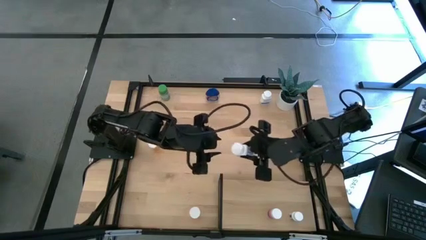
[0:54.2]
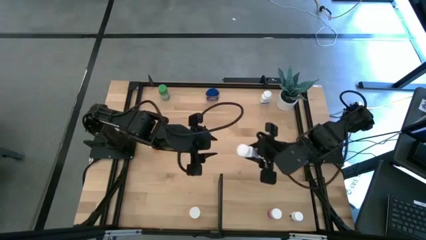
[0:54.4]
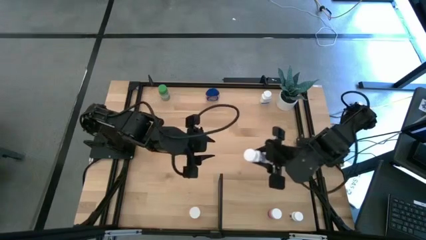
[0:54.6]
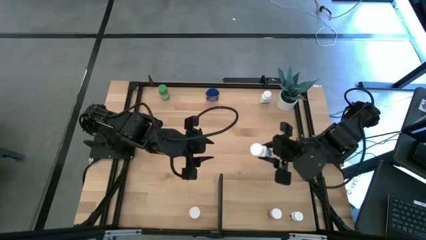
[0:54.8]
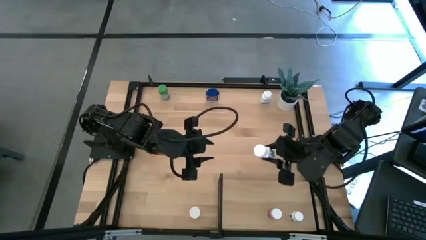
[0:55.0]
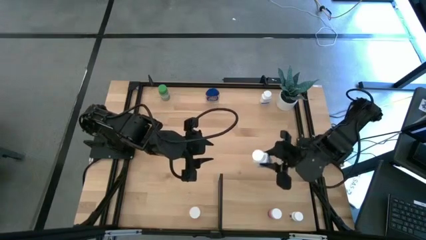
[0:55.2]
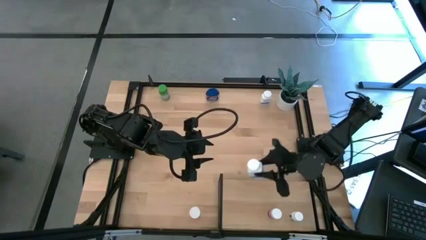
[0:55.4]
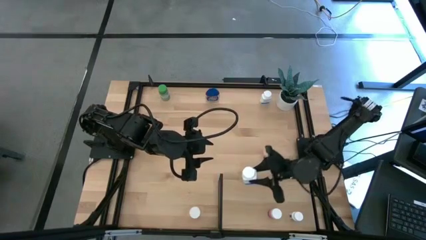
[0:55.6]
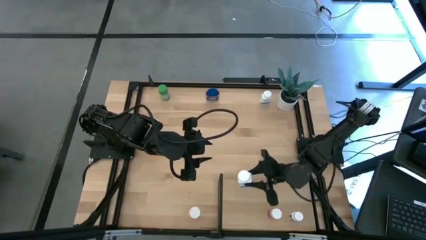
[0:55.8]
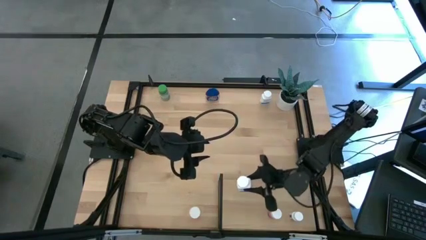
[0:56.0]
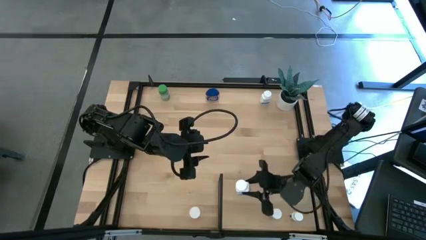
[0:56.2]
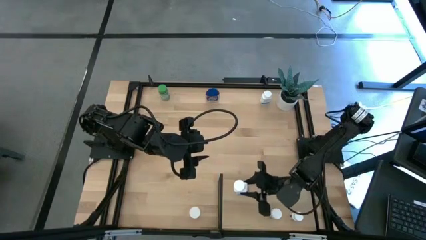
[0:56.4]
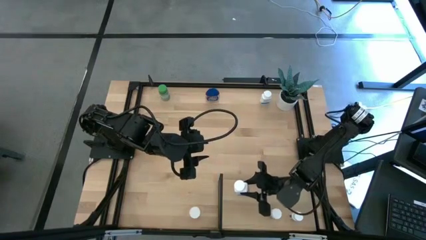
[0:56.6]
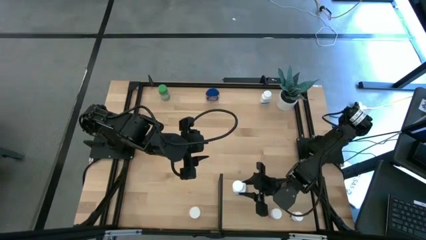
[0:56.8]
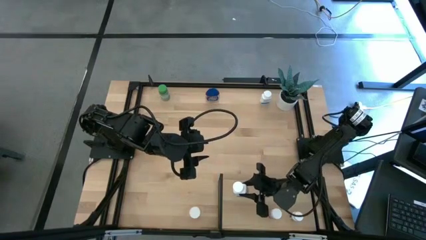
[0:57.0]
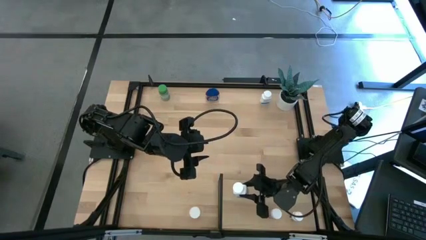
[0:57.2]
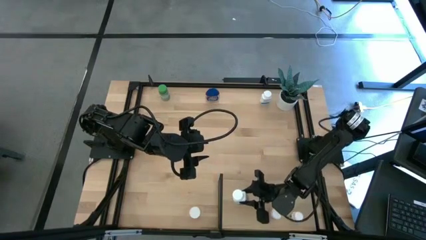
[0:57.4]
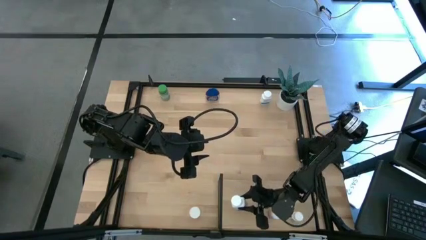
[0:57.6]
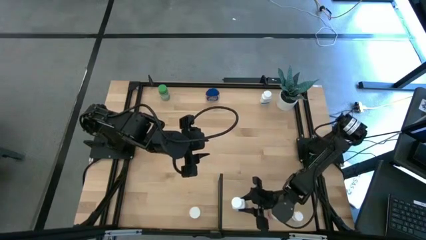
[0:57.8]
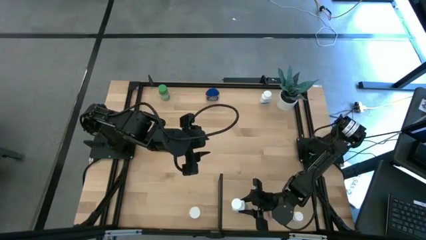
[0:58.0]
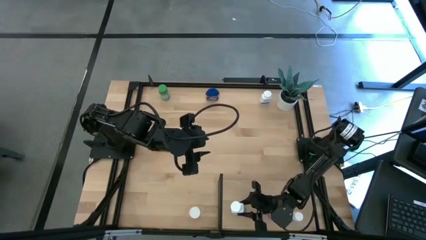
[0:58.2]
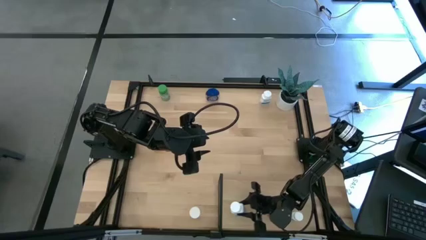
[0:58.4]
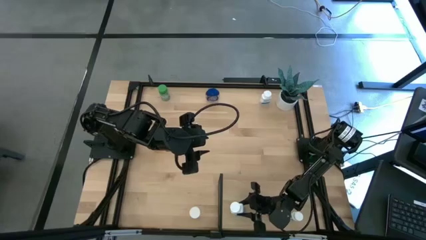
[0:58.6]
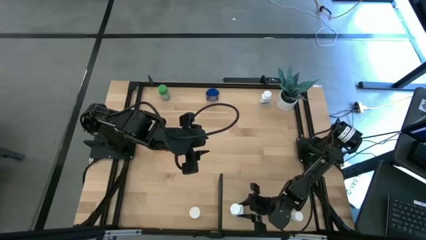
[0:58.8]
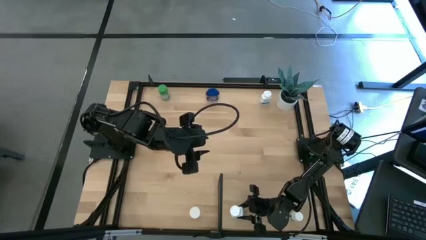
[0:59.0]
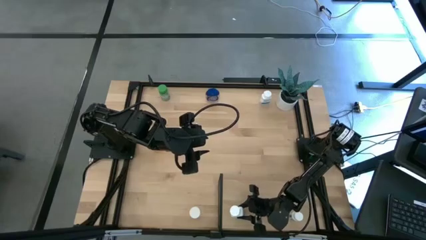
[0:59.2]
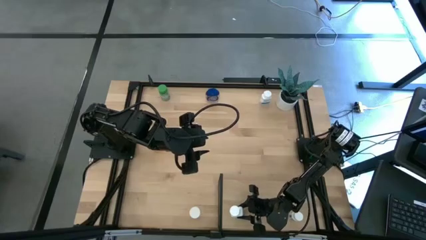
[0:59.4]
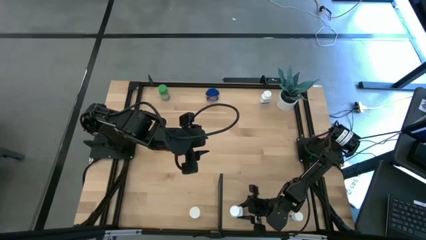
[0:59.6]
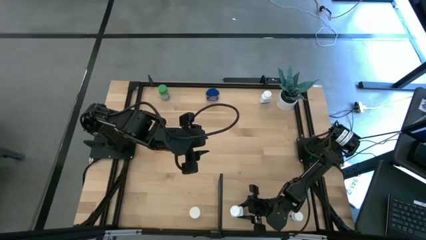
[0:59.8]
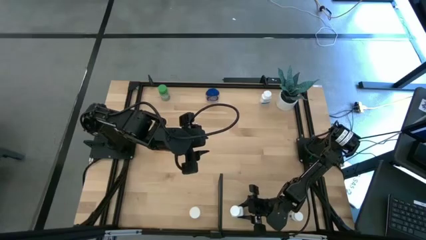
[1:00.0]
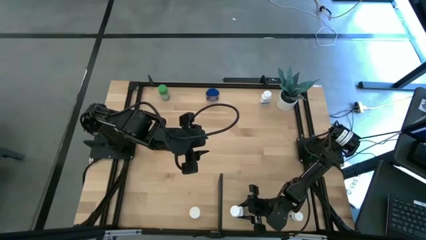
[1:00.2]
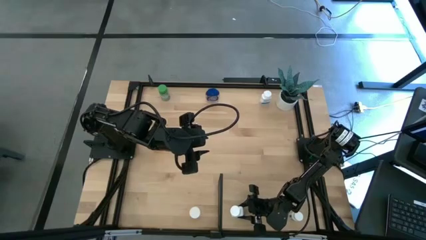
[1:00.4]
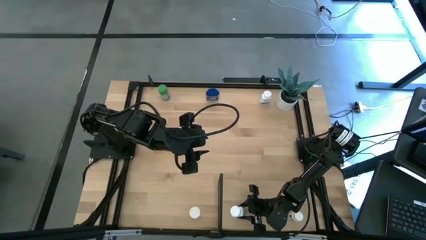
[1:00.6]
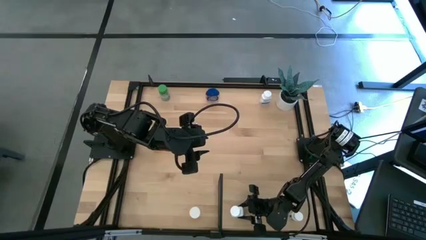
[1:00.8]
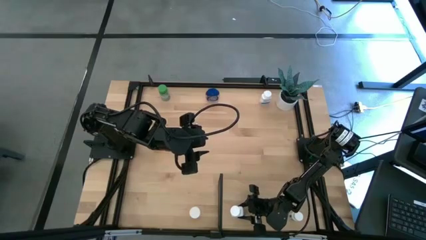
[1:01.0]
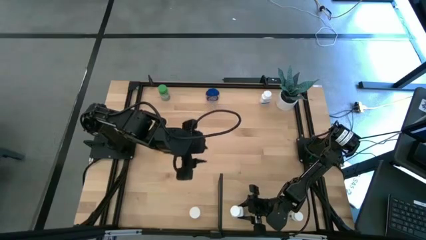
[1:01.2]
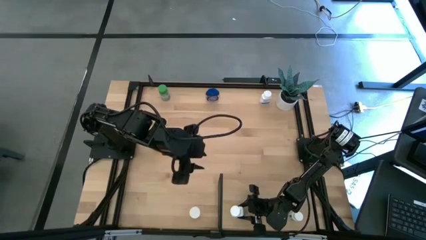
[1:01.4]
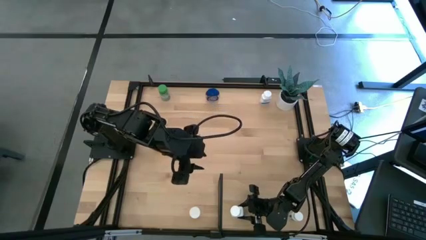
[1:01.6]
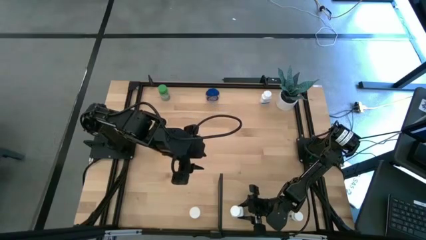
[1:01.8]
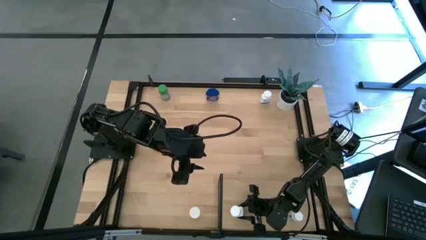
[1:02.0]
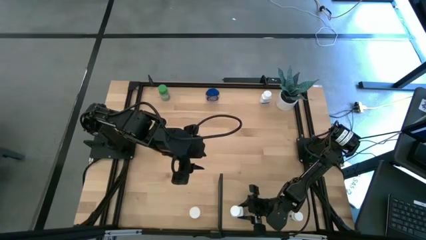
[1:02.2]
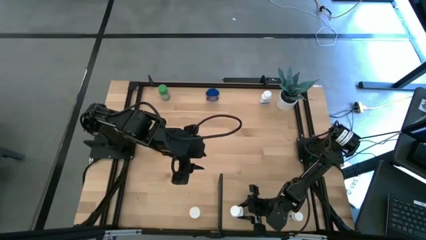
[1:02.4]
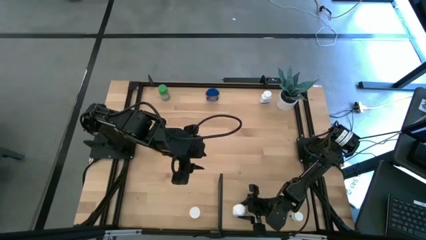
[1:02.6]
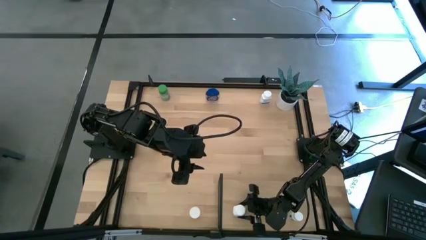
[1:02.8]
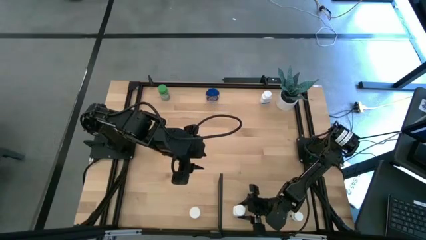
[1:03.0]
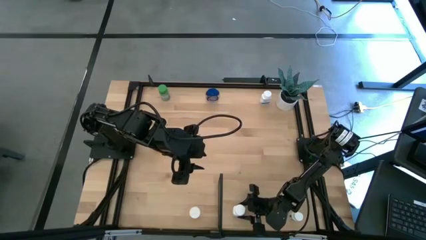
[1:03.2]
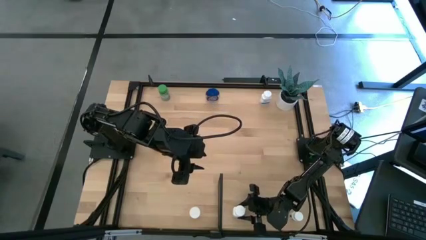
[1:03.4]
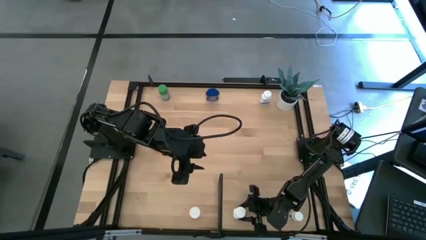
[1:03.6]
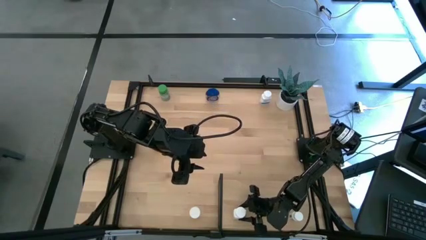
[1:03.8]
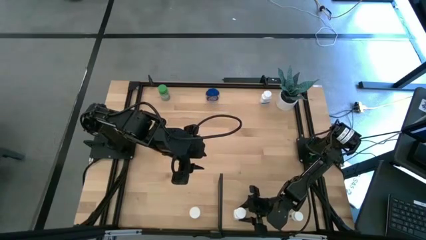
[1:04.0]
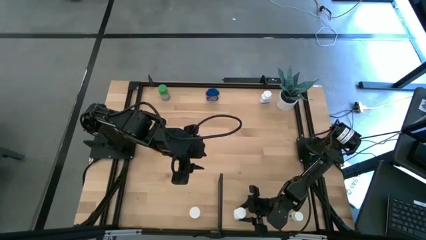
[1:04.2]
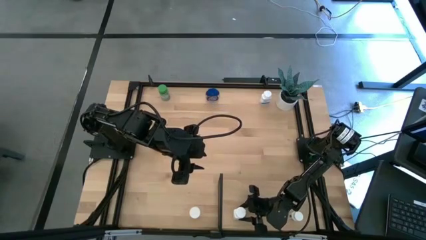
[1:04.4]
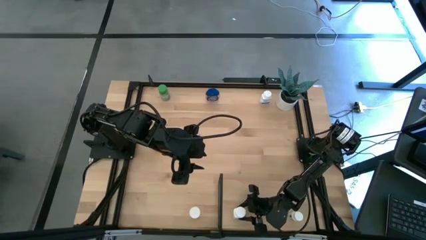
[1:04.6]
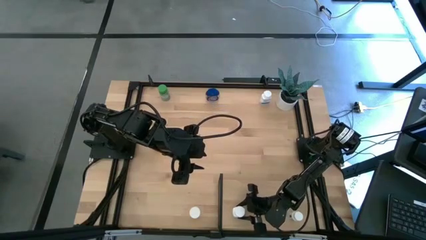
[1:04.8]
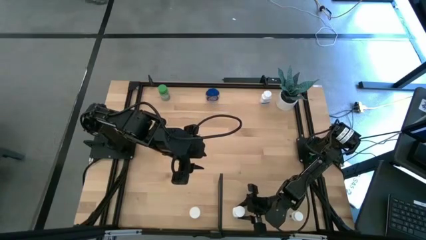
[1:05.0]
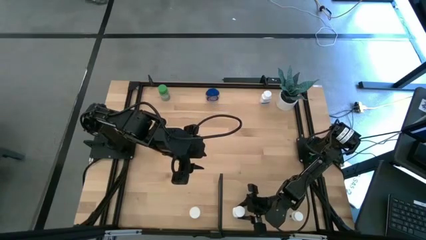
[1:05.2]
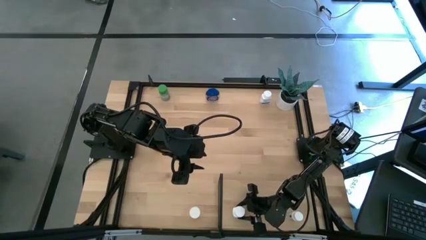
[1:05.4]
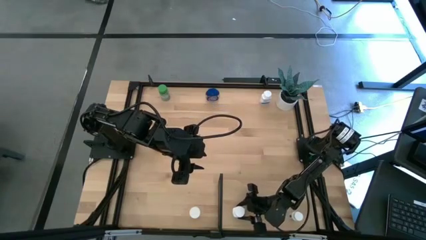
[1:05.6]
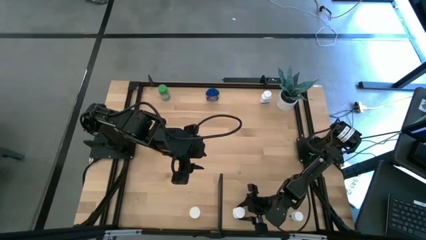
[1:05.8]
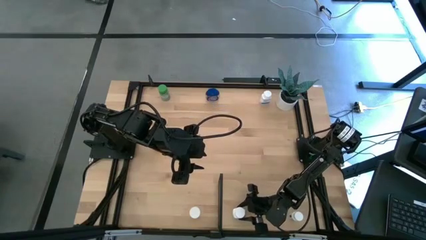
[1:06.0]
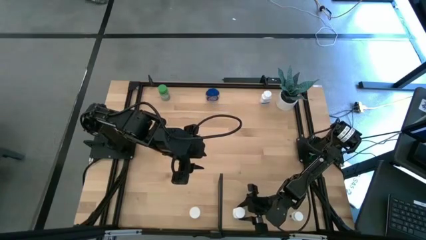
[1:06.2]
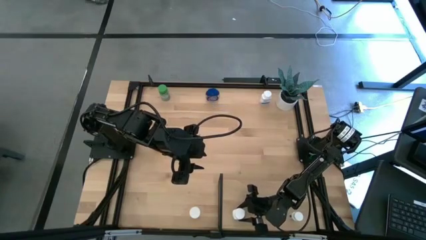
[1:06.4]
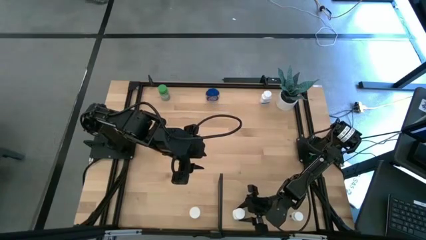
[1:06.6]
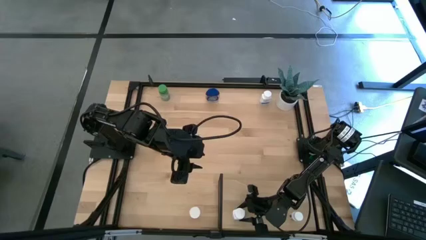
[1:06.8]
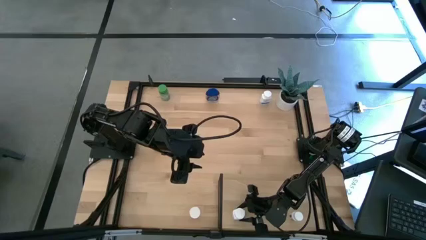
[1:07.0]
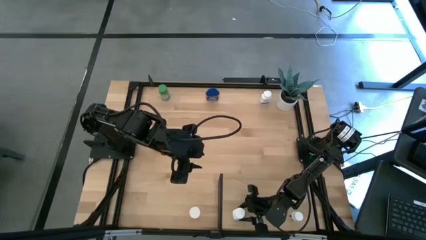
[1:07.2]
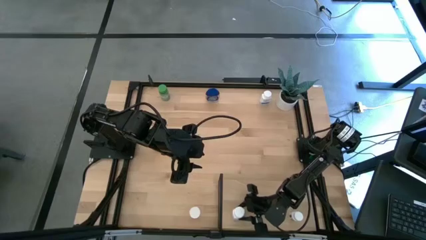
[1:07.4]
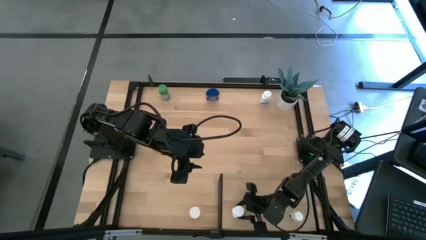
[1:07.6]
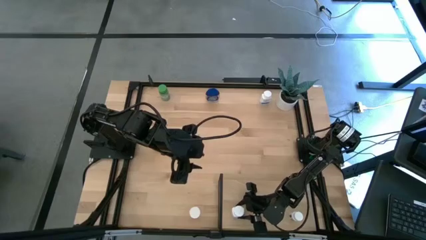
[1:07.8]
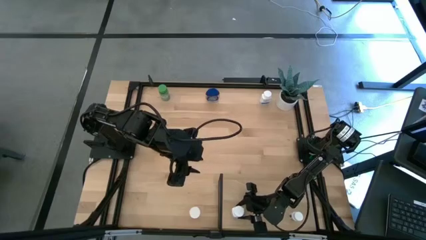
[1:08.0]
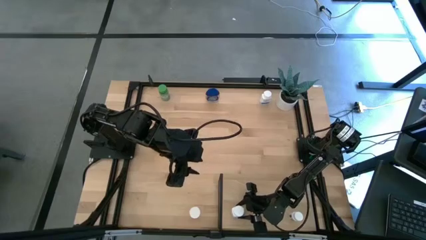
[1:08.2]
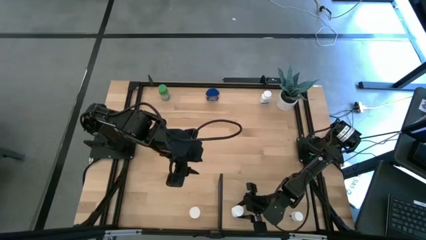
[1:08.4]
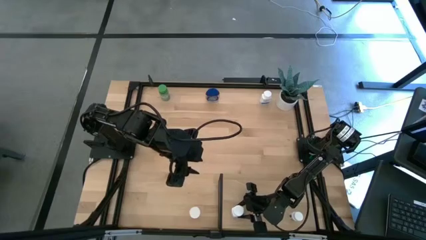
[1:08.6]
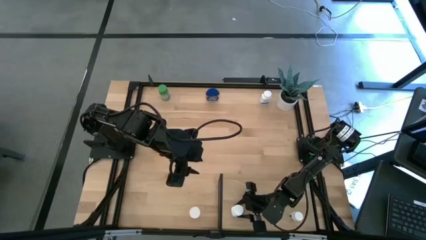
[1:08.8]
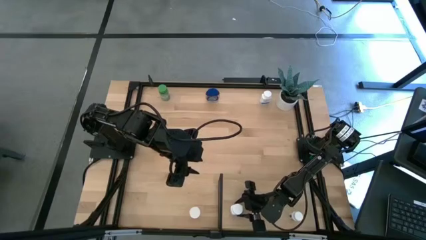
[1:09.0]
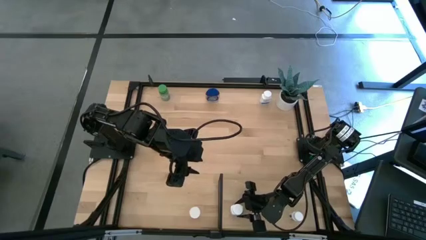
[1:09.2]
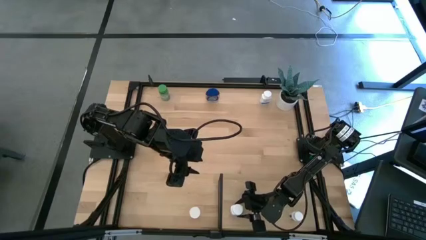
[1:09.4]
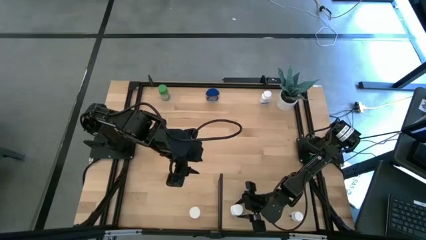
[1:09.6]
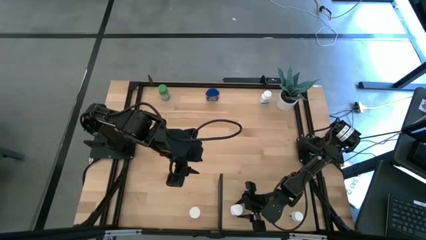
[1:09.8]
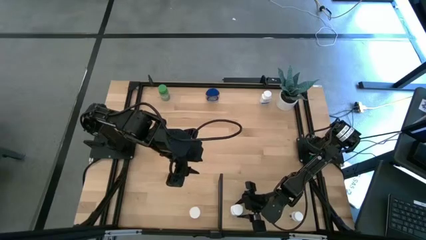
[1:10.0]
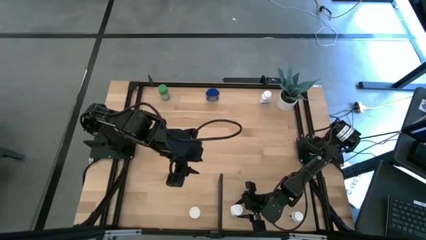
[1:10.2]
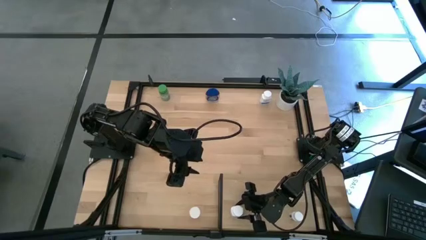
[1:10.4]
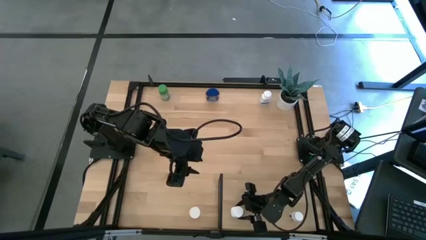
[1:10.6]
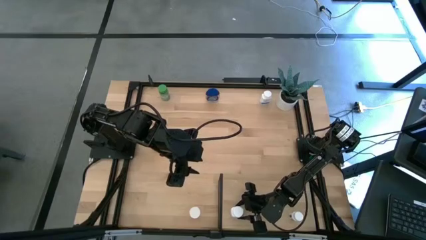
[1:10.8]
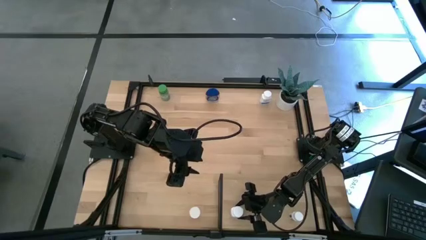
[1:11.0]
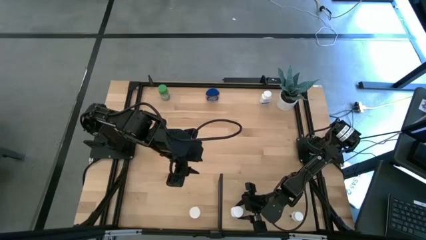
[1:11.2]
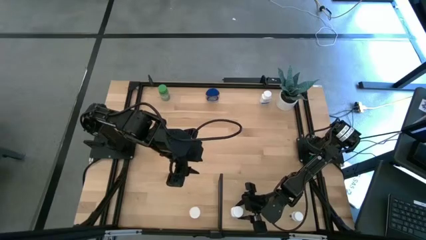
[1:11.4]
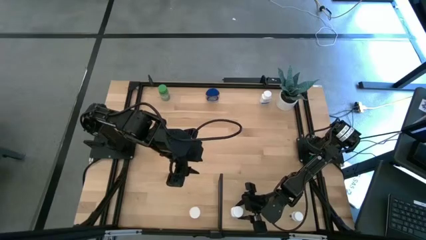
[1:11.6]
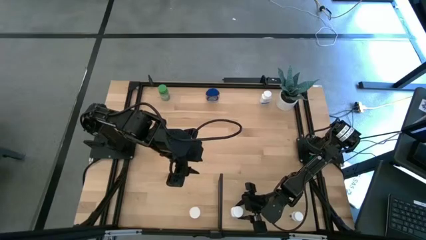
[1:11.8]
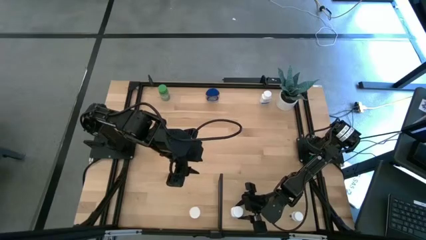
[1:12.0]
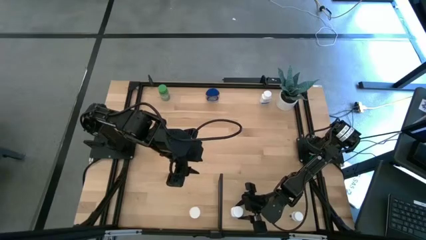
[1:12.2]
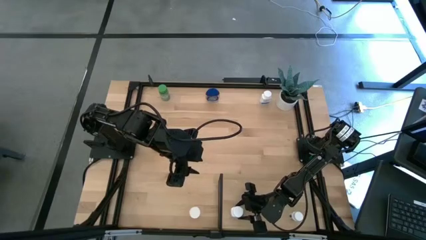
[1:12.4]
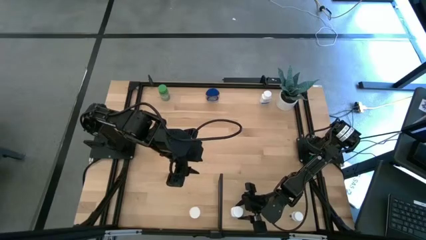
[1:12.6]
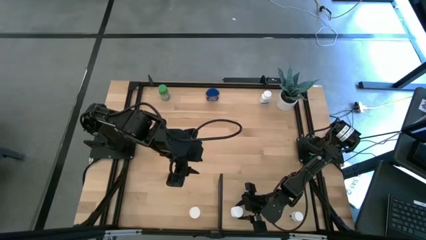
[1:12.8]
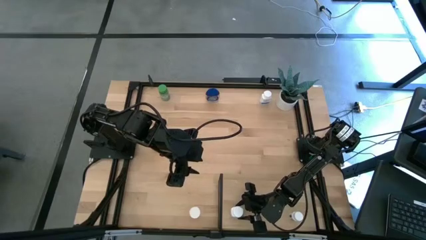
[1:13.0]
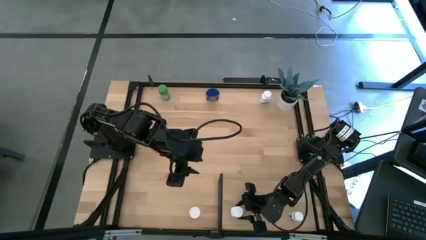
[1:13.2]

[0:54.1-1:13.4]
Task: Pick and place medicine bottles onto shelf by color
Put the bottom left white pill bottle onto the shelf
